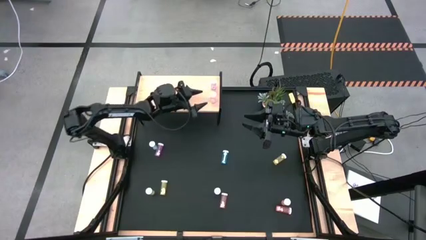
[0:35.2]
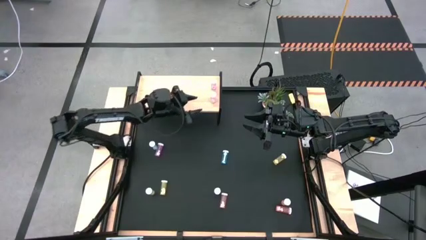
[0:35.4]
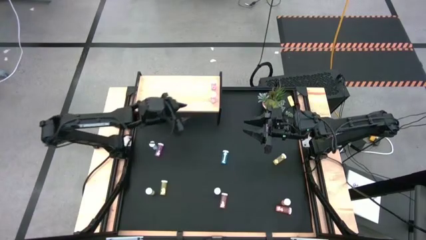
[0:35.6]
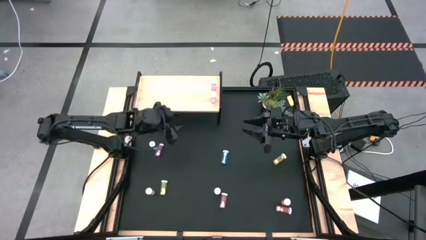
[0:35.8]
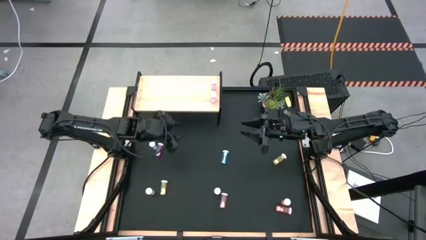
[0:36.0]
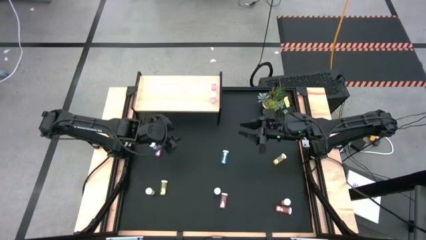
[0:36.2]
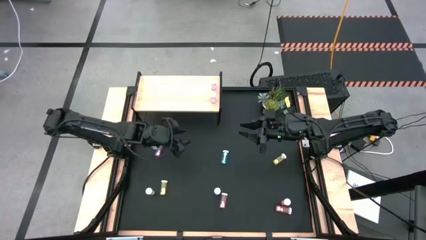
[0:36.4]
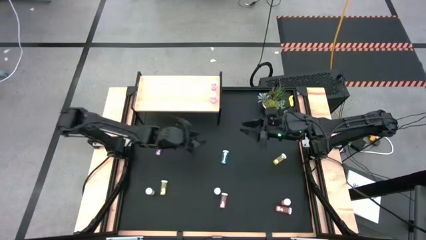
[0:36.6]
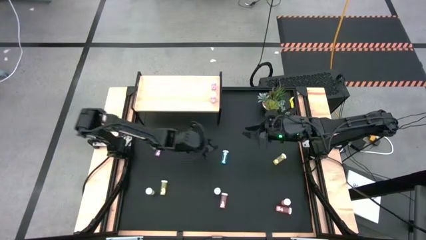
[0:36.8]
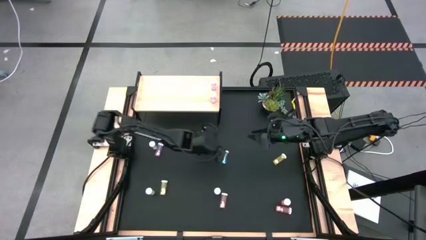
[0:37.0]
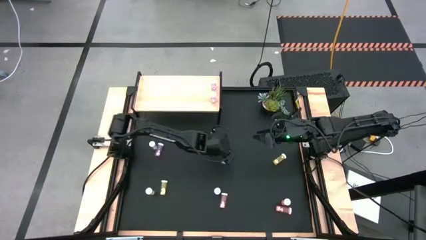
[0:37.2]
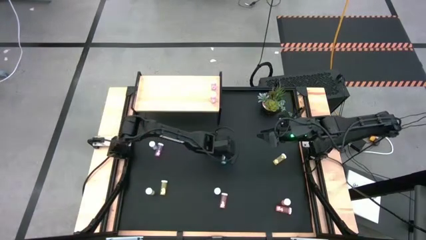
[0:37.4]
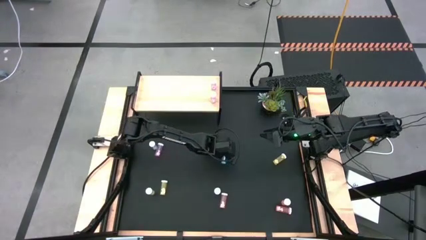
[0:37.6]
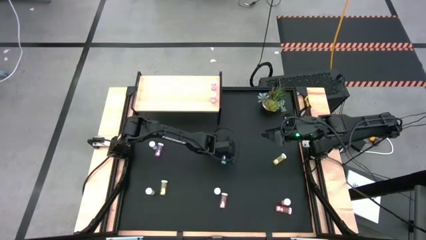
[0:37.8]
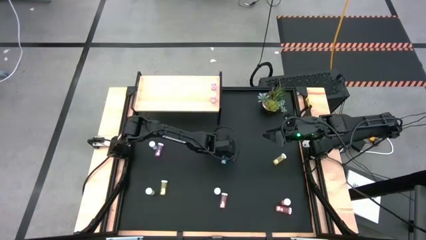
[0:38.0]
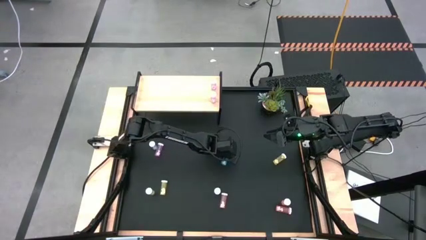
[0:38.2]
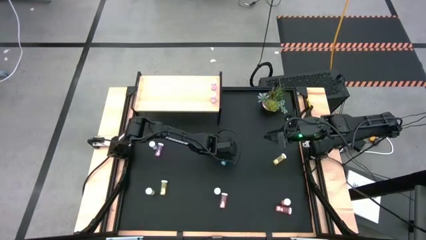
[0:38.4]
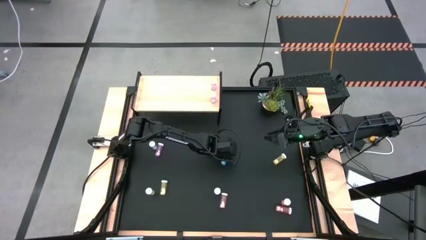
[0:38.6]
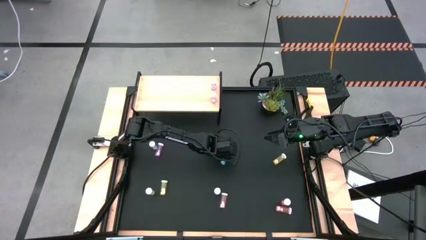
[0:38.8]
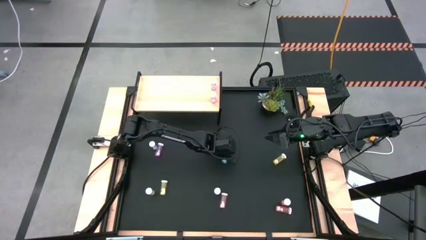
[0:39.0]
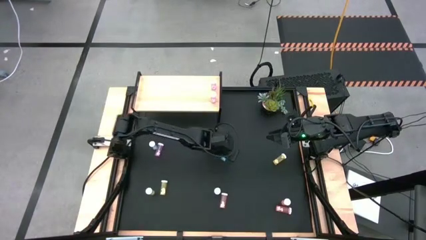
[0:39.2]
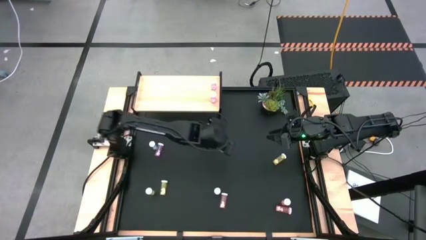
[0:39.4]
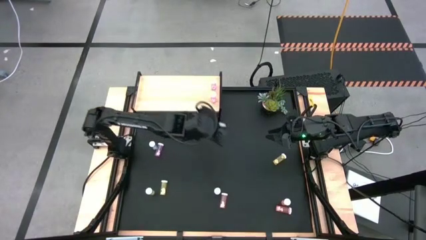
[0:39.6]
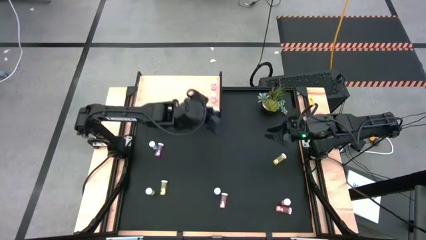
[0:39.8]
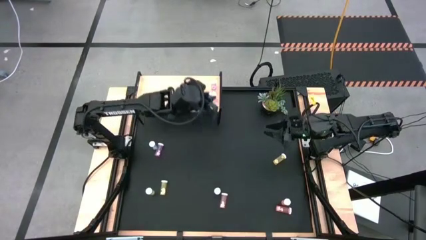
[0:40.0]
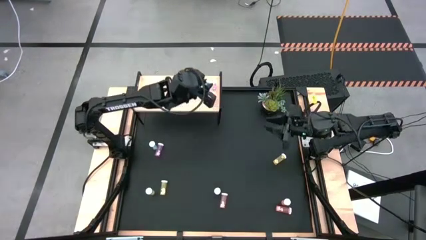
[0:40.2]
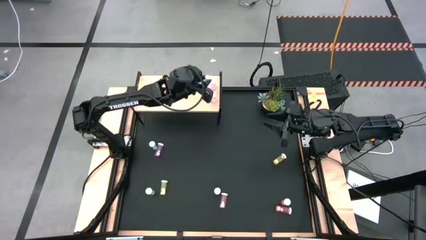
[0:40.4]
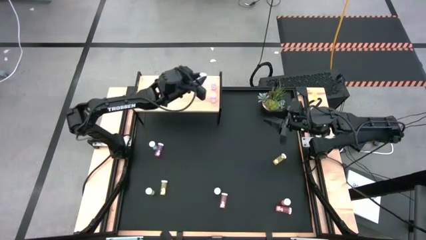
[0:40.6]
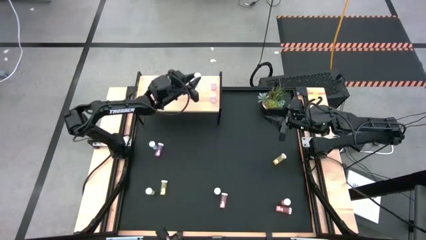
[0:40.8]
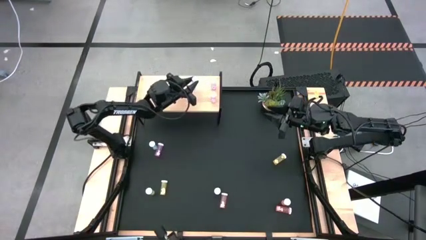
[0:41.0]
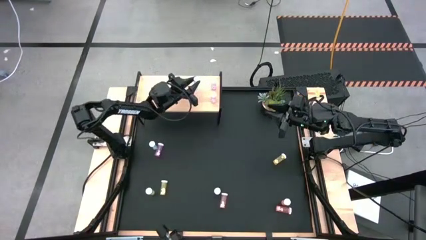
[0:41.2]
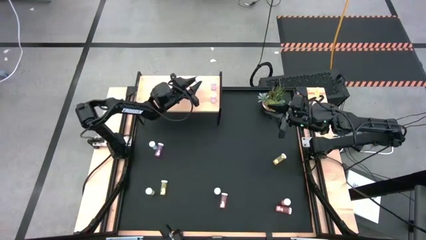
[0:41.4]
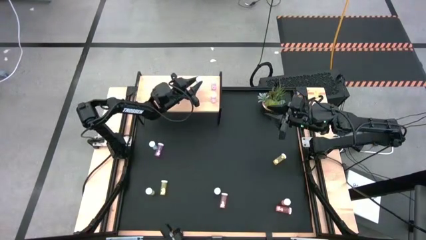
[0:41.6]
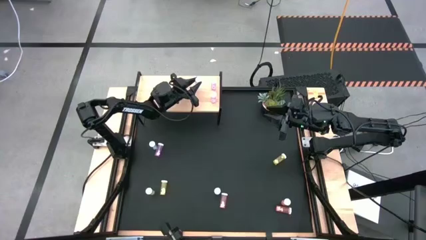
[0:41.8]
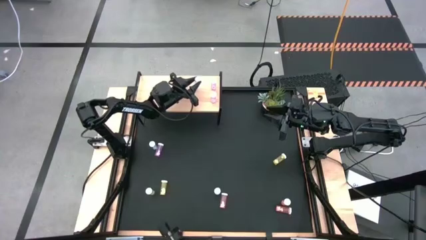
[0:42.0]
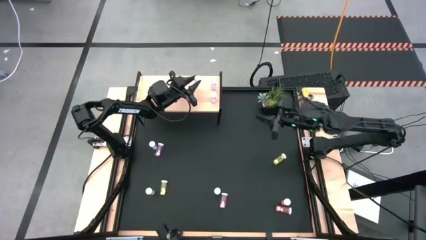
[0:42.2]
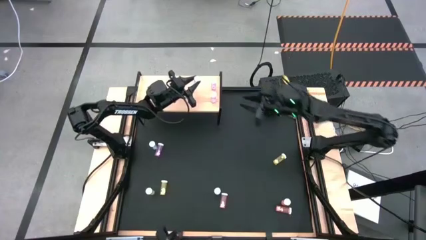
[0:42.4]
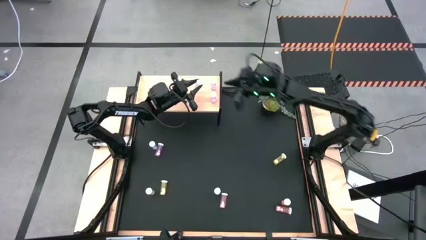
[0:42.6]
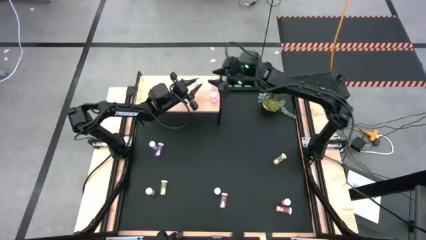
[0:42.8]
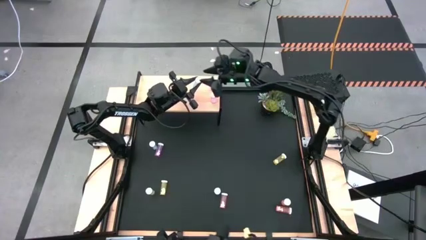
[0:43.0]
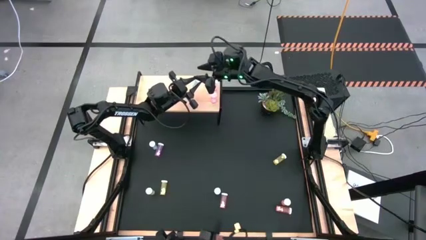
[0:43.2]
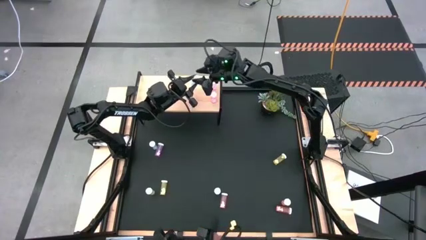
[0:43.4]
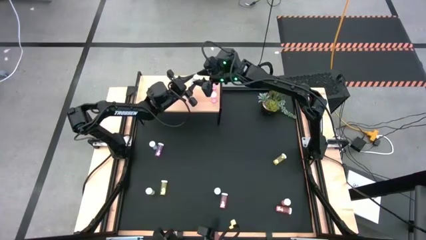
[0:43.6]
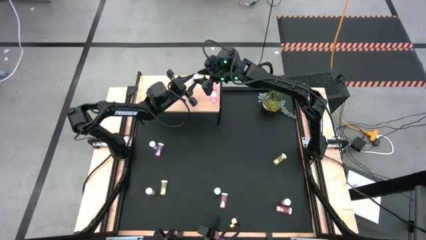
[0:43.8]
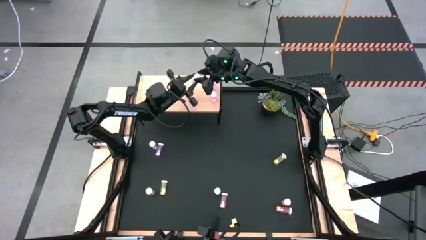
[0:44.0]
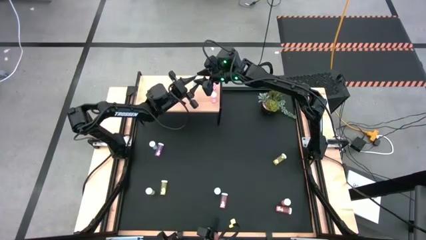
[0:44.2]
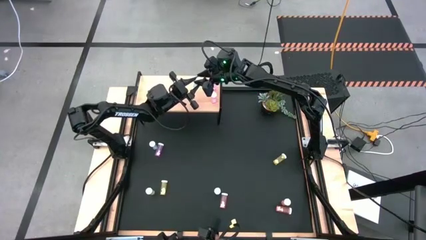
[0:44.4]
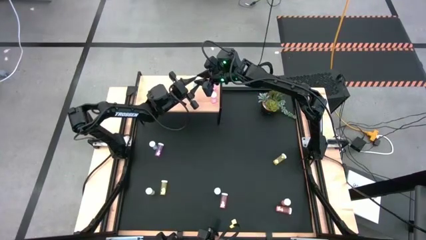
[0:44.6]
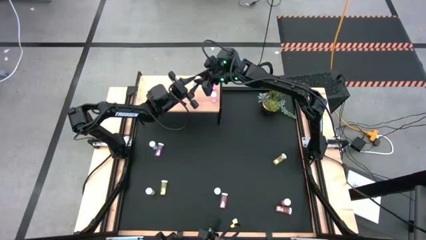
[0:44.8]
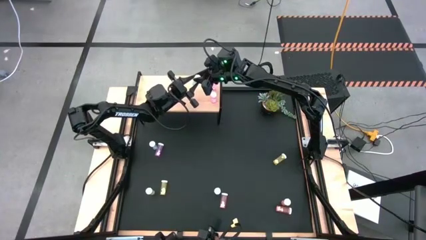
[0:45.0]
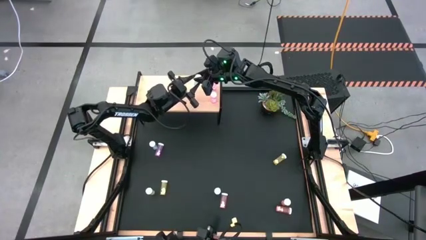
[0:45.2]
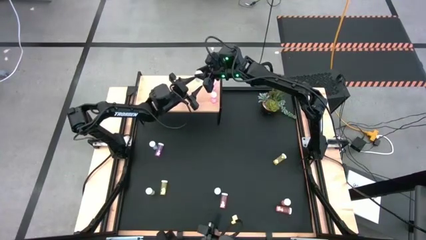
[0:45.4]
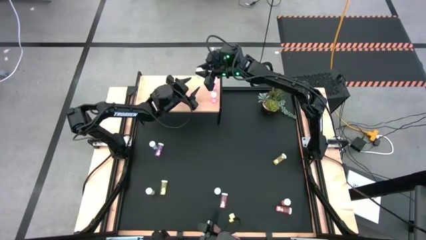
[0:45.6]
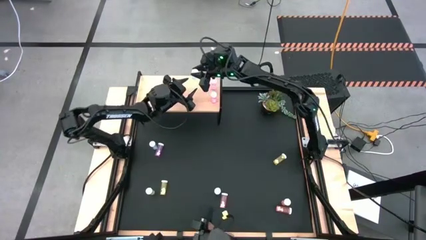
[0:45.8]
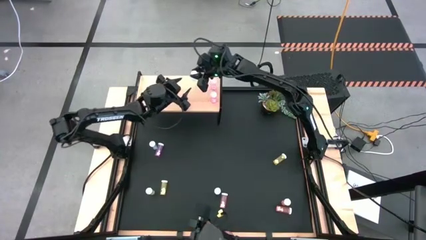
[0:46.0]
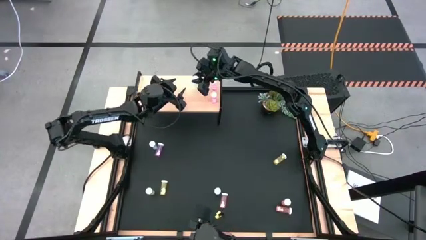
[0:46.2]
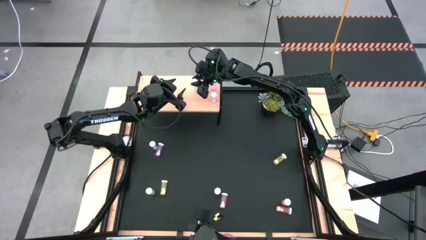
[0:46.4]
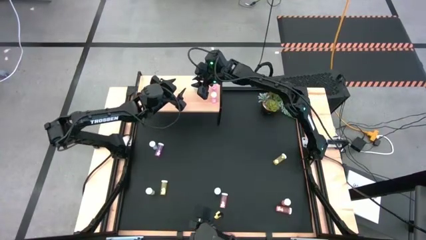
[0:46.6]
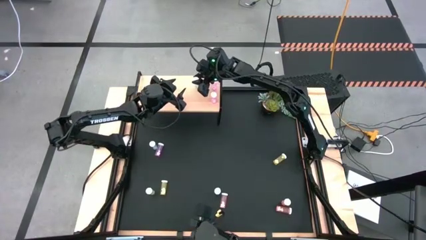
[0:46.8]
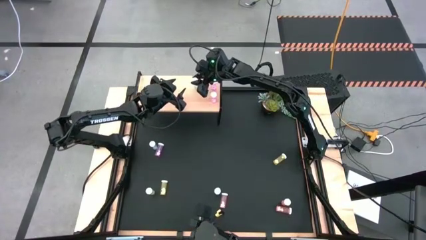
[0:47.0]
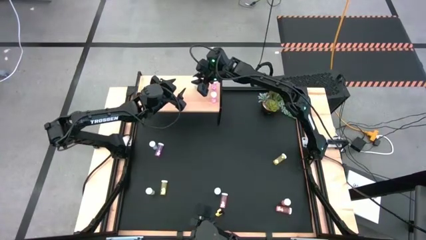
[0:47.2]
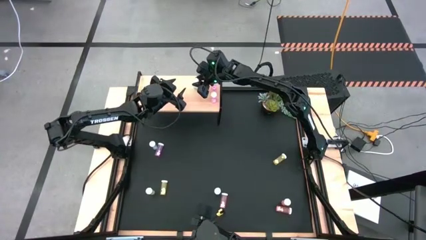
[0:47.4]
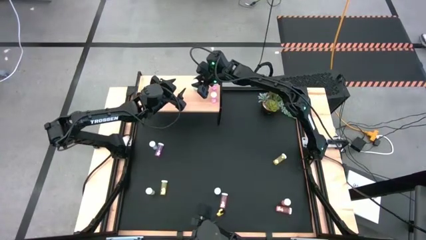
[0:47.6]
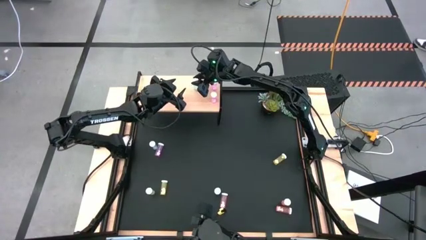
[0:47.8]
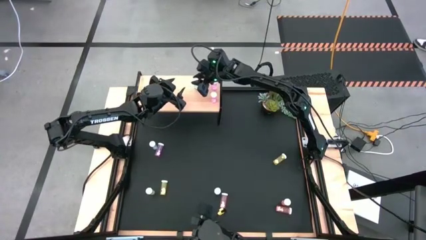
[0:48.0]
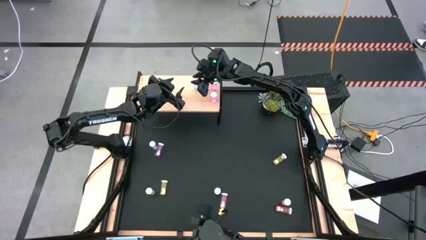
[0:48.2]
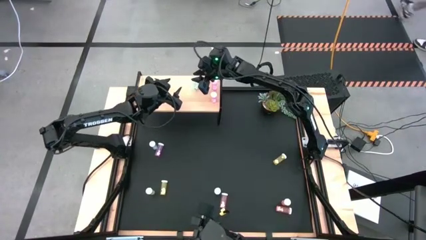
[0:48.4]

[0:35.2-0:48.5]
Task: Pick and place medicine bottles onto shelf by color
Put the top right blue pill bottle on the shelf

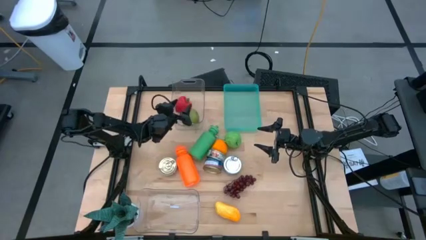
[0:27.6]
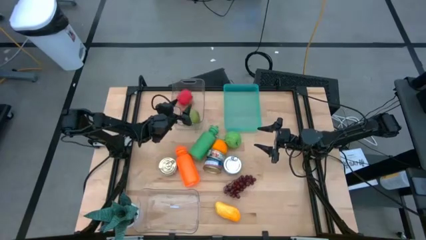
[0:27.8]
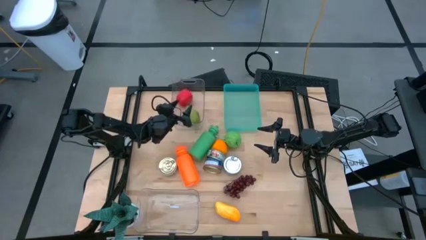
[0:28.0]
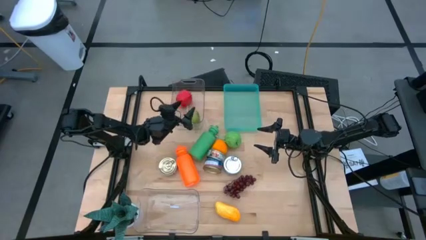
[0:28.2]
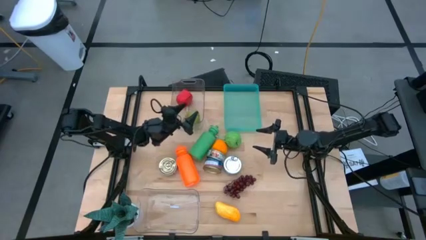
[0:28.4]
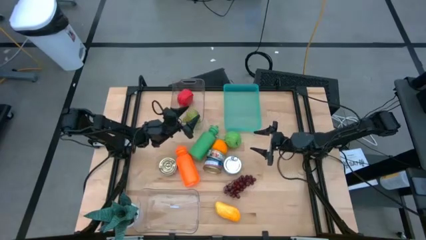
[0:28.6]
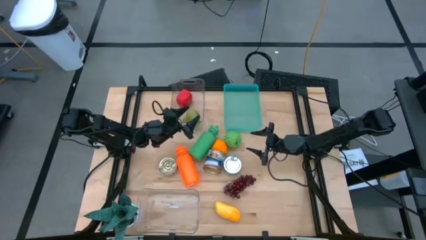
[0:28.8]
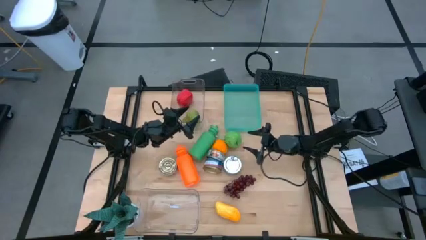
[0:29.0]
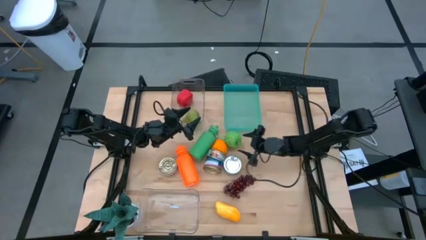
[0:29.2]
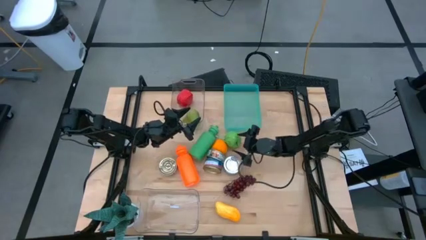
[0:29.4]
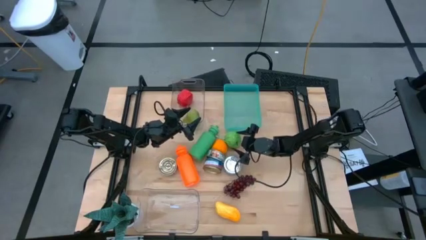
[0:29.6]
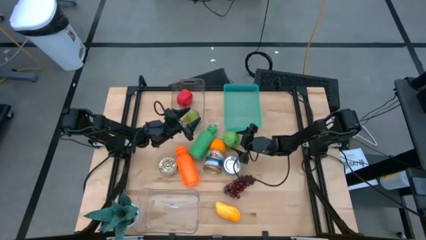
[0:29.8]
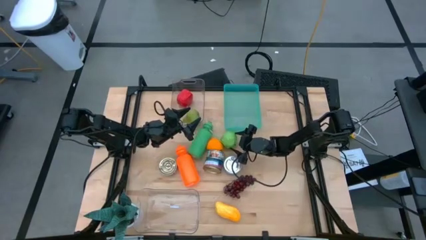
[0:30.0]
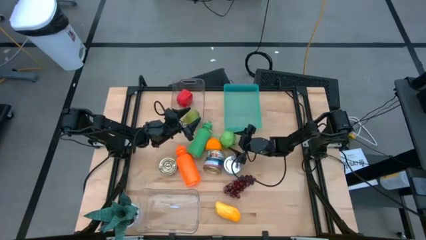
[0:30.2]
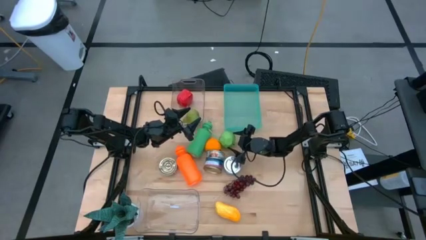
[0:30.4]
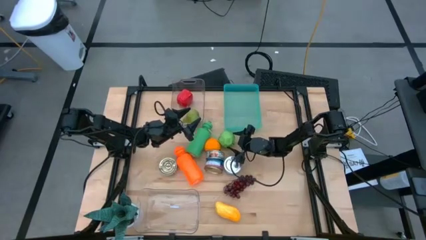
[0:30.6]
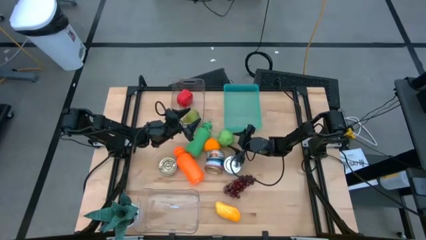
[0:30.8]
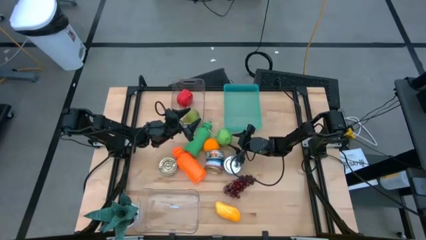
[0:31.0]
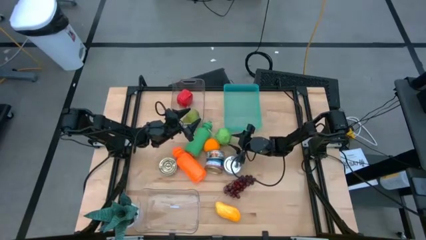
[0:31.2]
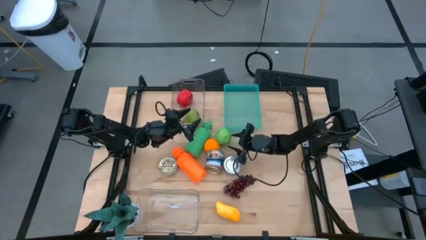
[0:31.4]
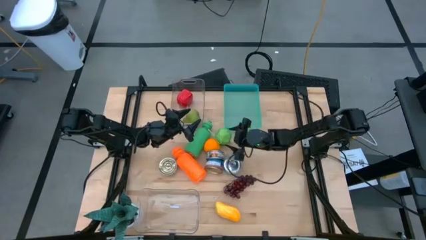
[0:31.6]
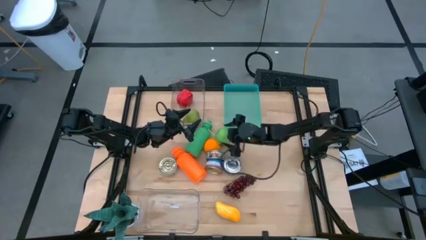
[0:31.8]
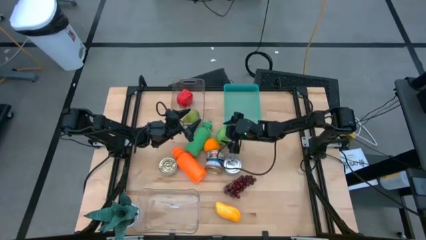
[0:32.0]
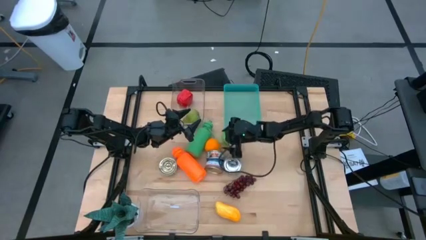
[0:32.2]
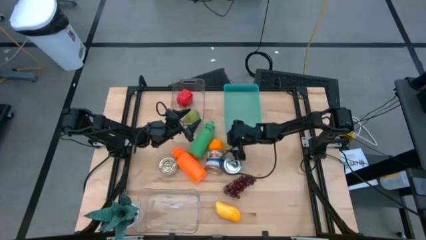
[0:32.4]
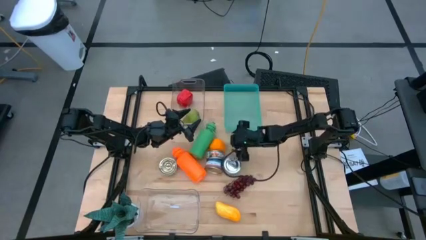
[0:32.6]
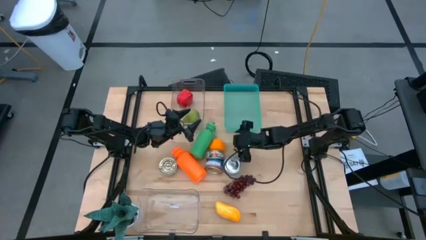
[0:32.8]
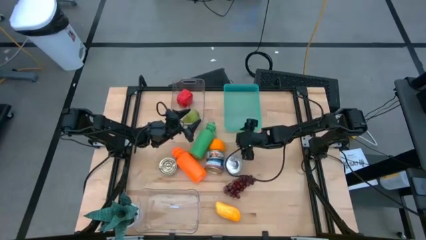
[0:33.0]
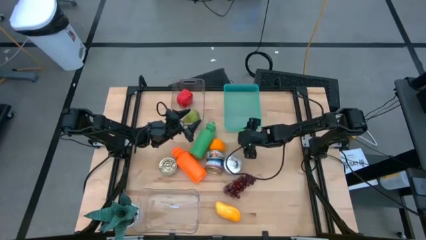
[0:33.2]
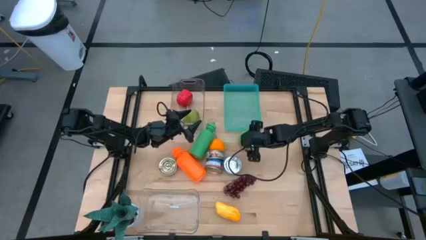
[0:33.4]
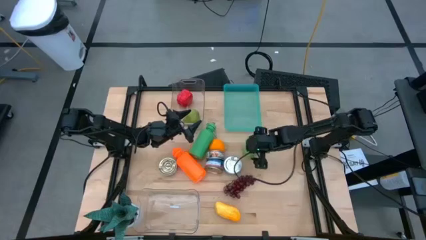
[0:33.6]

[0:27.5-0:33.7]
Task: Pick & Place Food Item
Put the green apple into the top transparent bin
